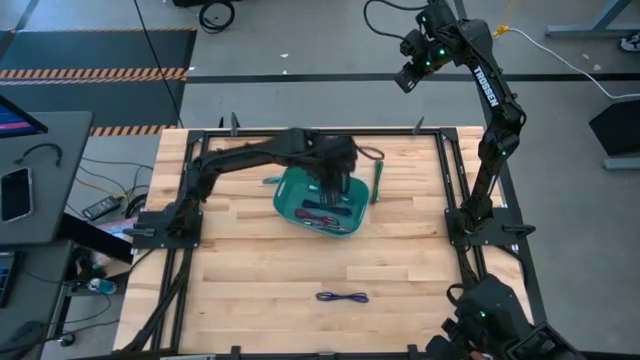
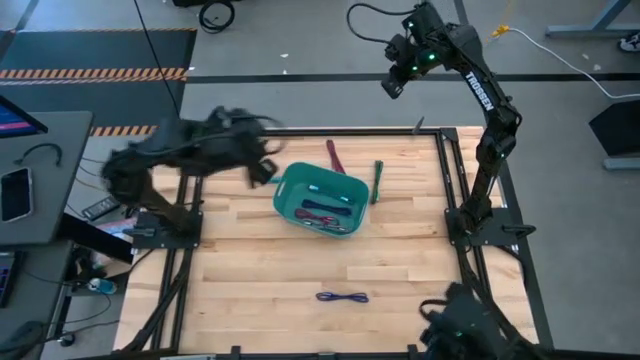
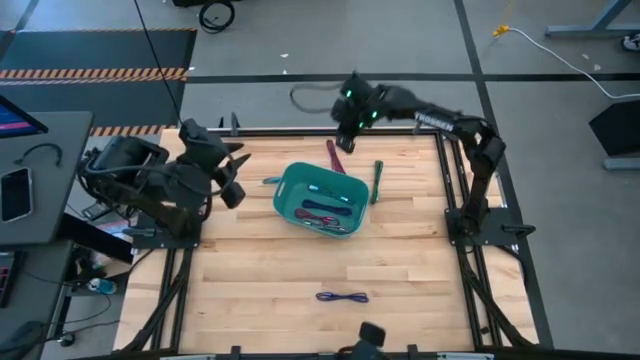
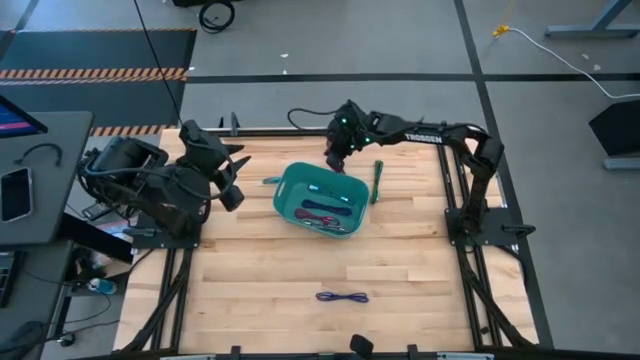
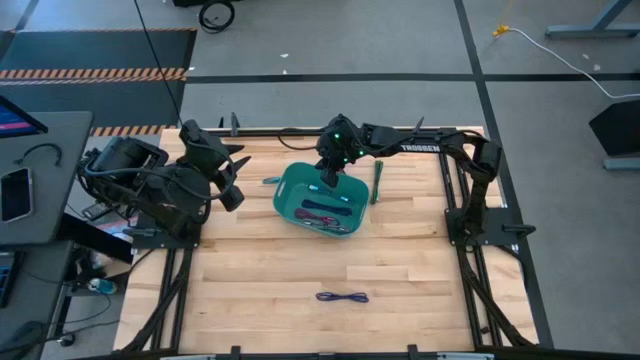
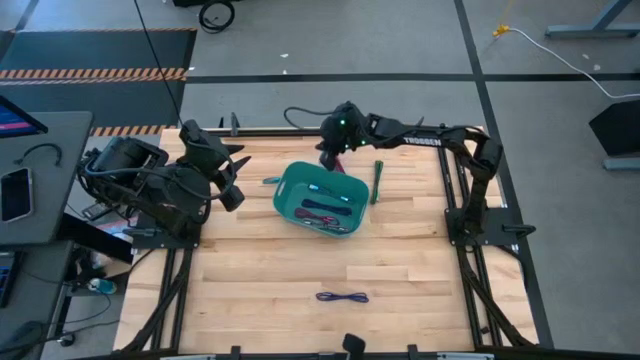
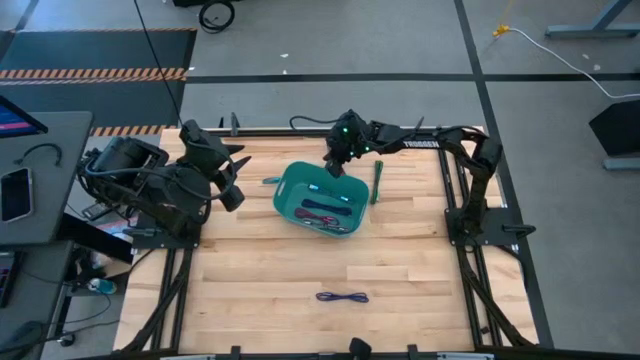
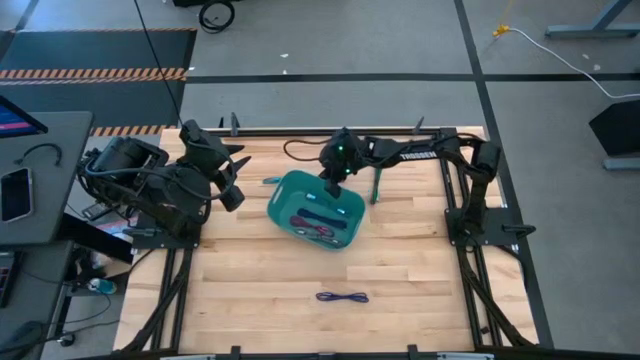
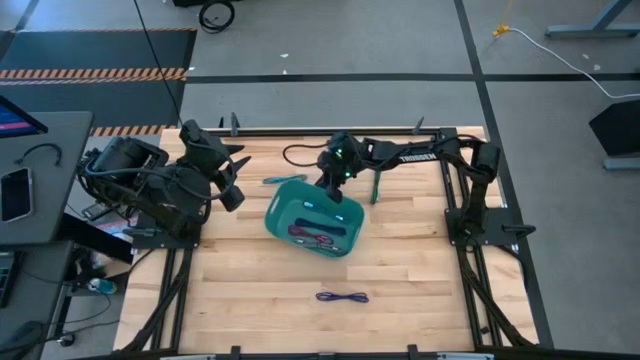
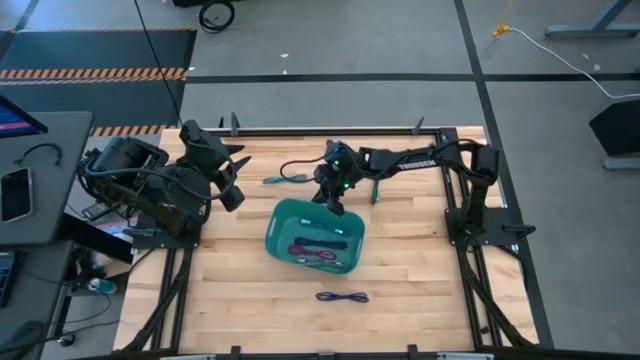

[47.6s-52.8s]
Task: Pick and place USB-C Cables
Move the blue bin to the center of the table

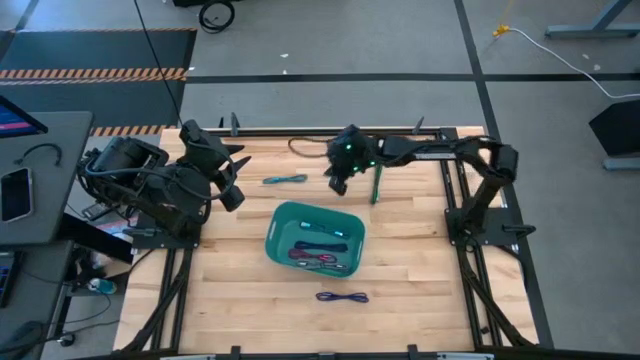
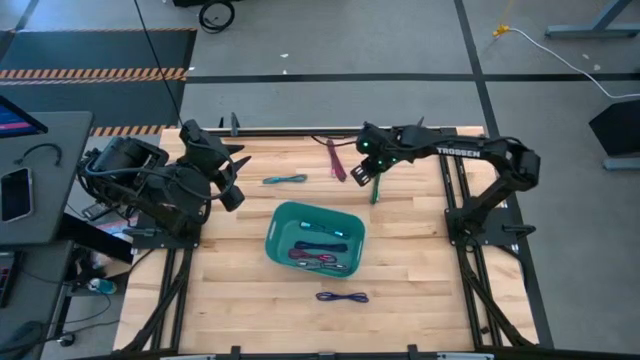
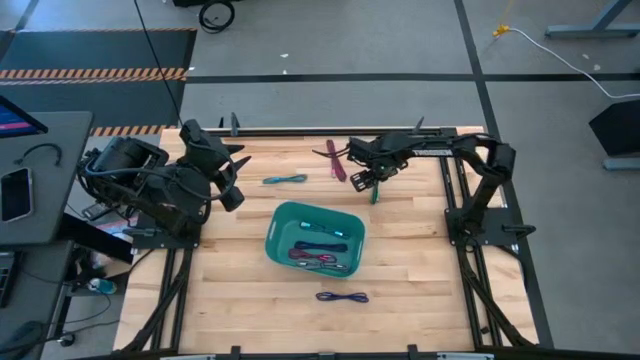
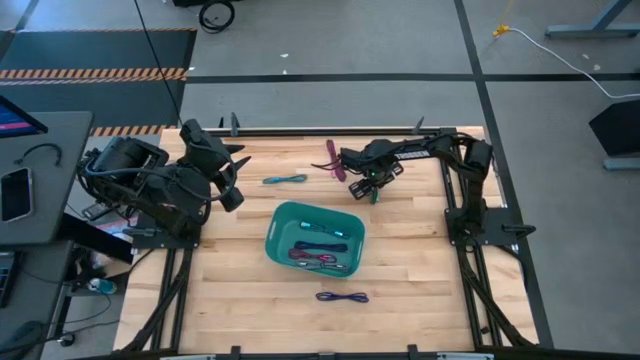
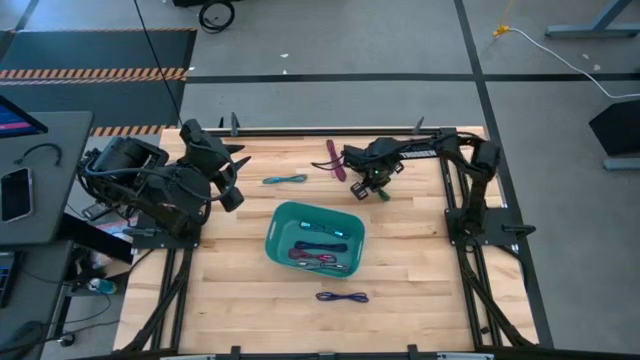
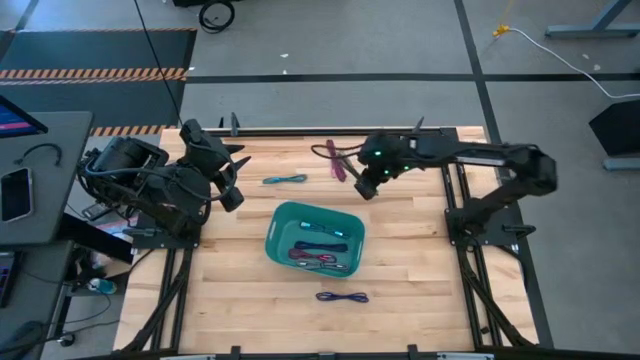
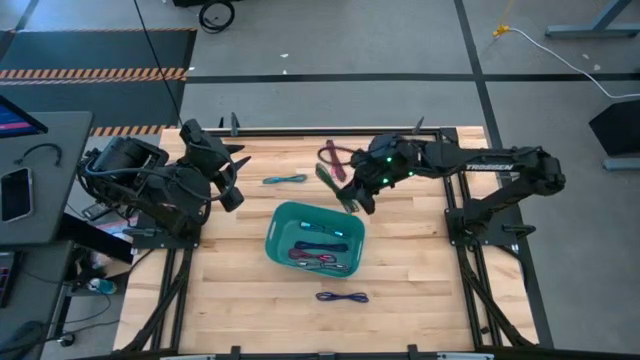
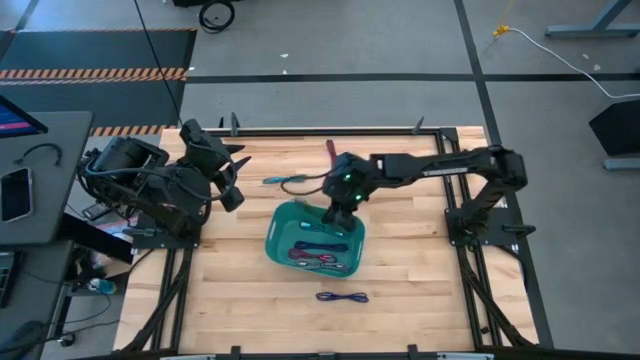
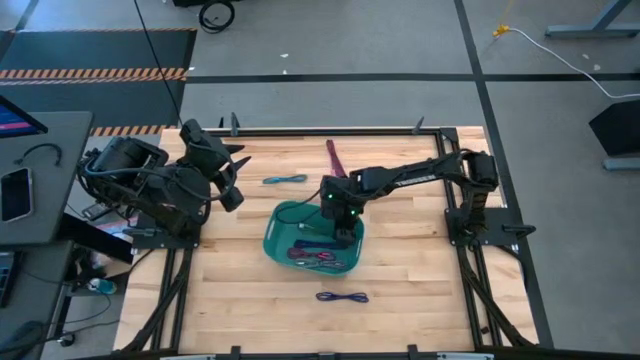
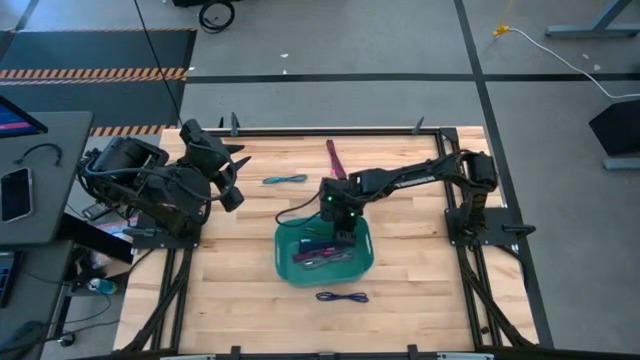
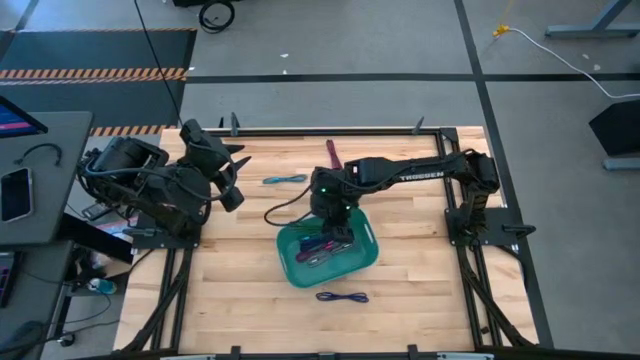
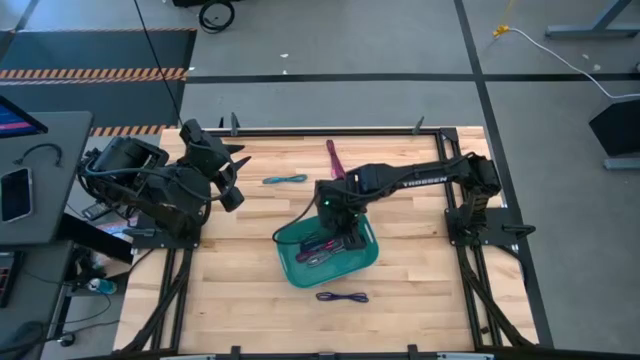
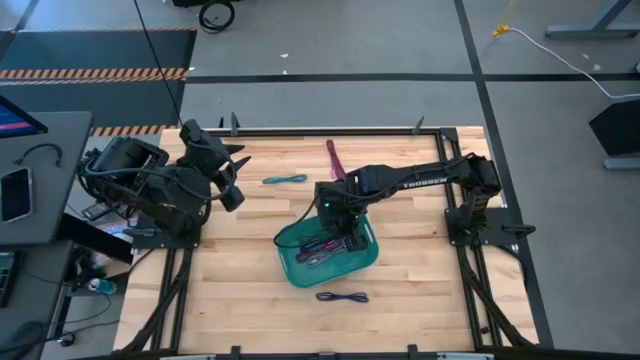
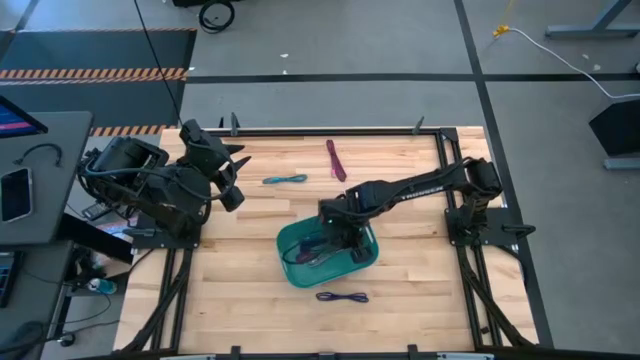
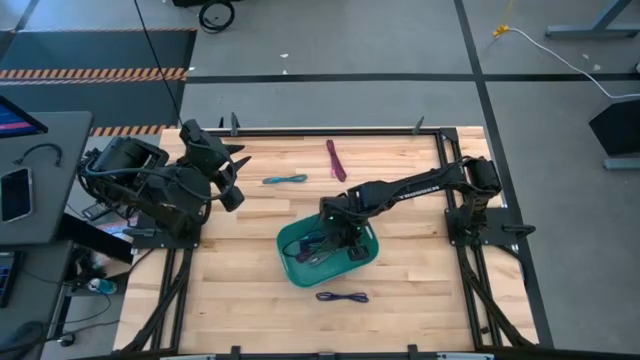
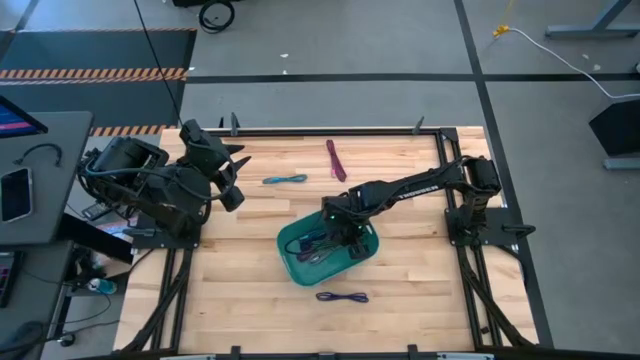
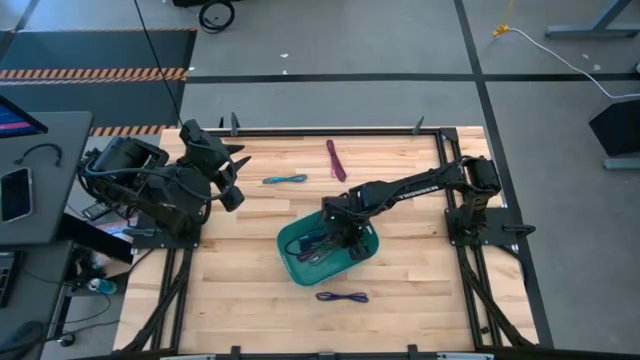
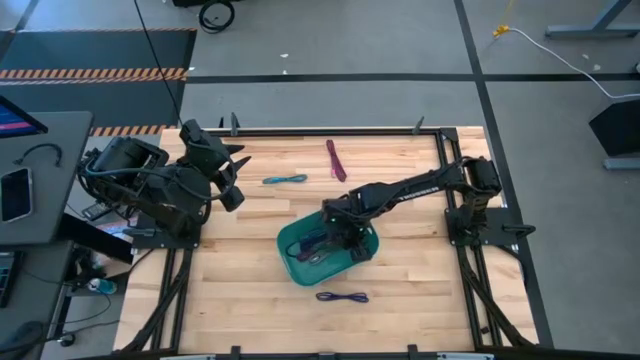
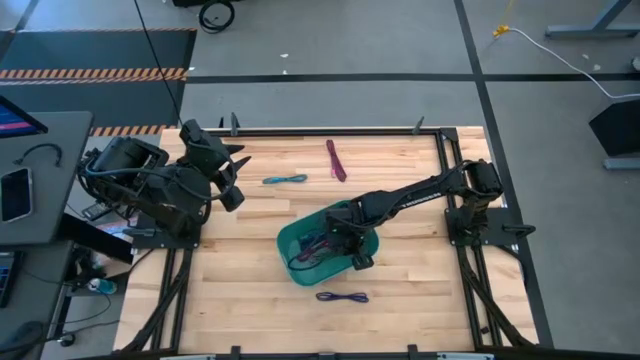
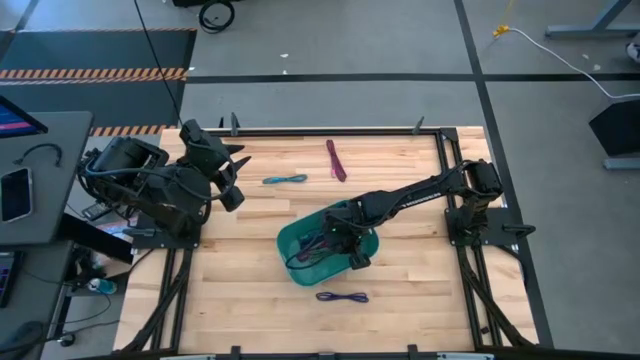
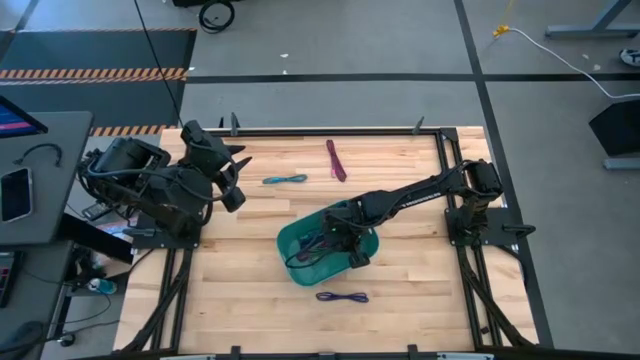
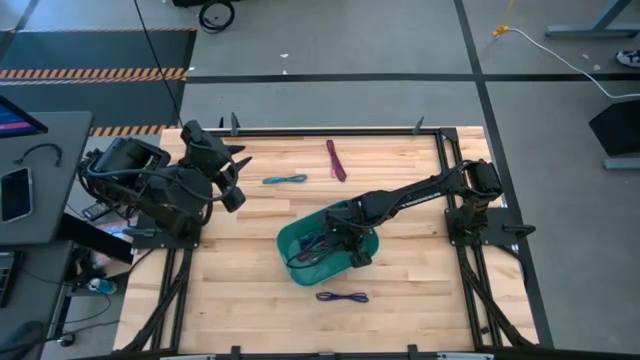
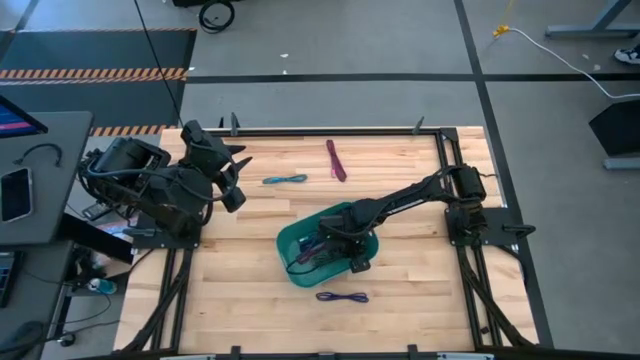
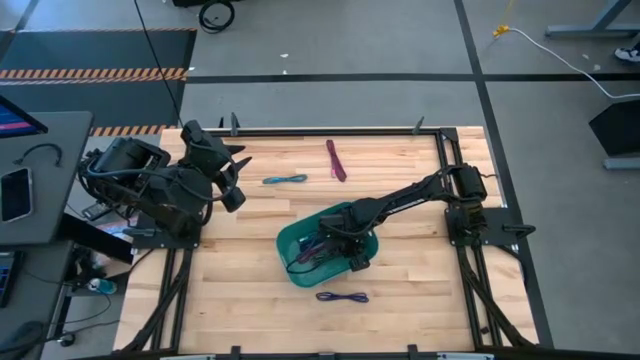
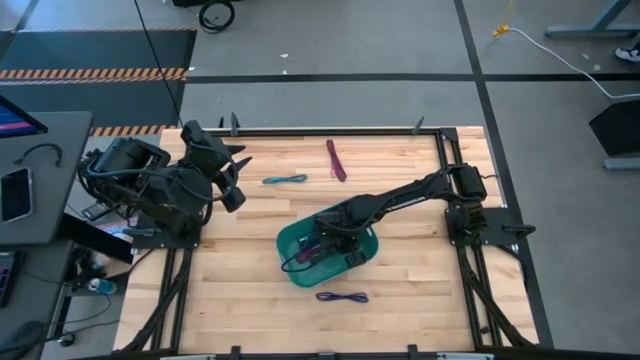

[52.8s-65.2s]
Put the green charger cable into the blue bin

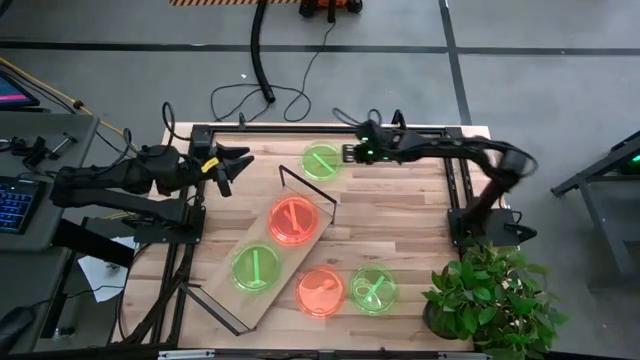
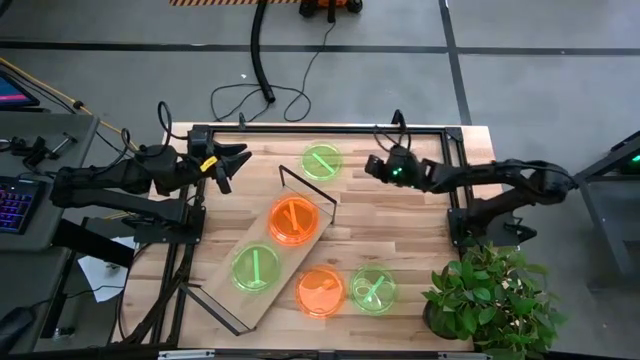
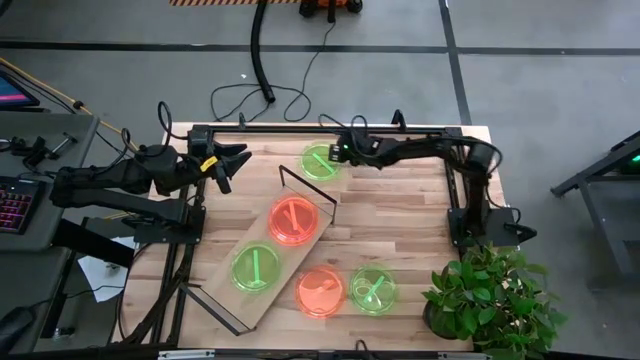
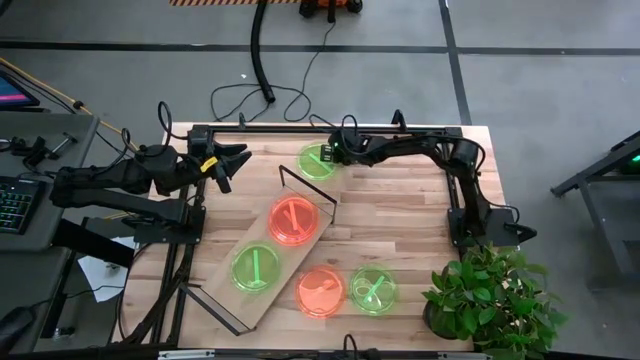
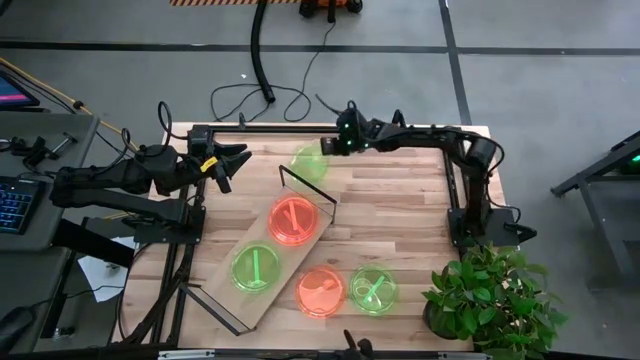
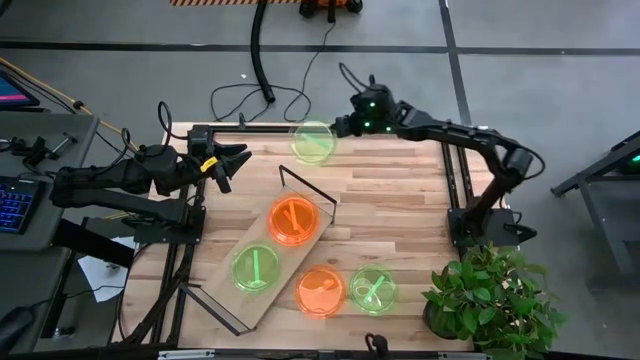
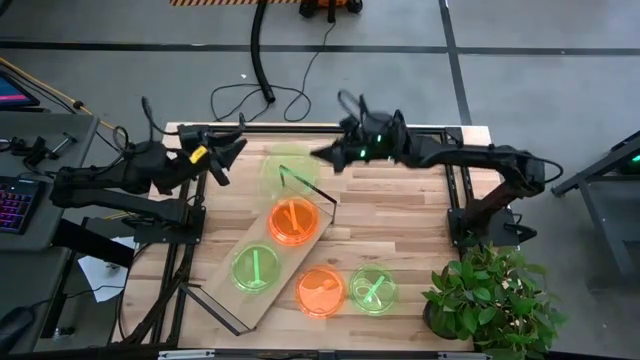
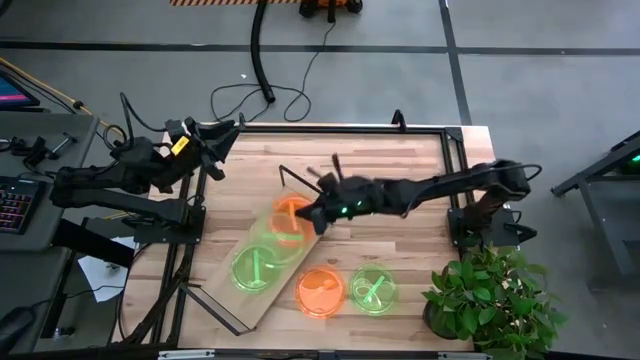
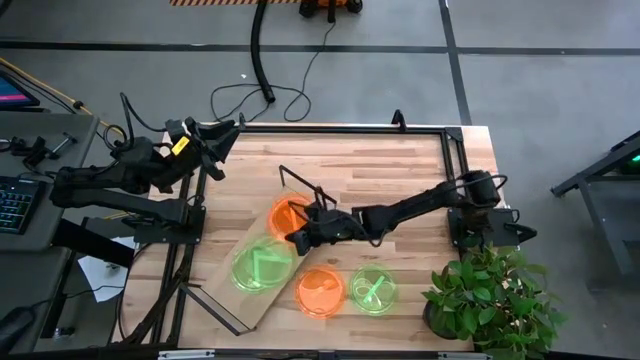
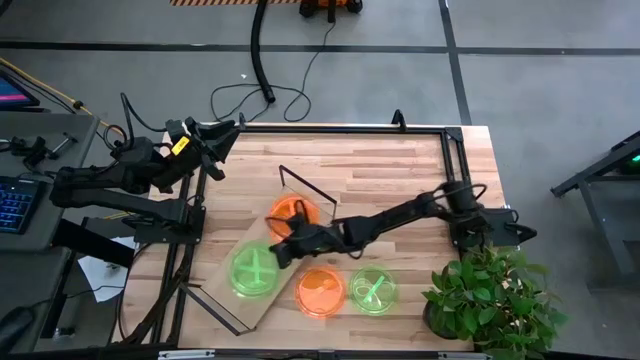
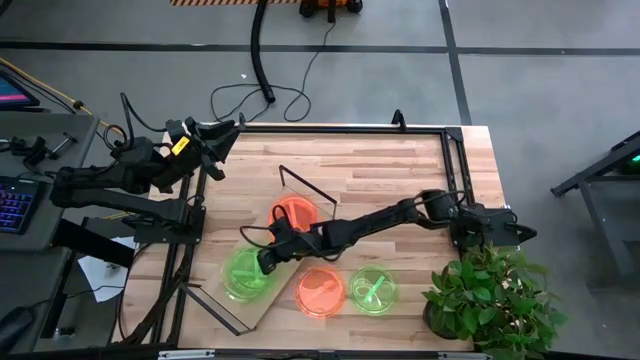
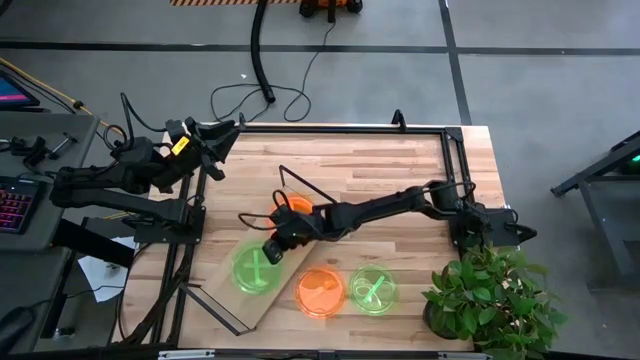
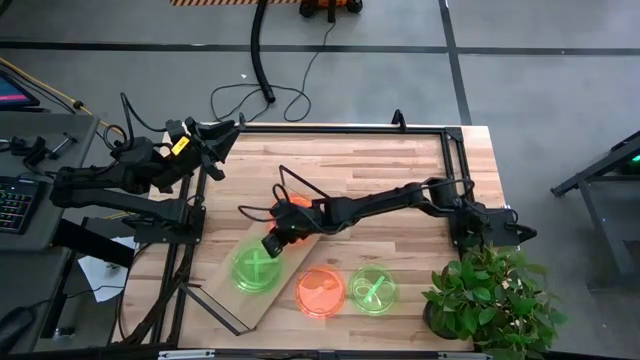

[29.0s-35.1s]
Task: Place and stack plates onto a shelf
Stack the top green plate on top of the other green plate on the shelf
